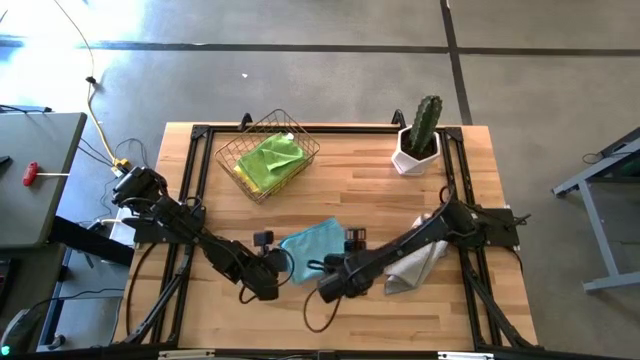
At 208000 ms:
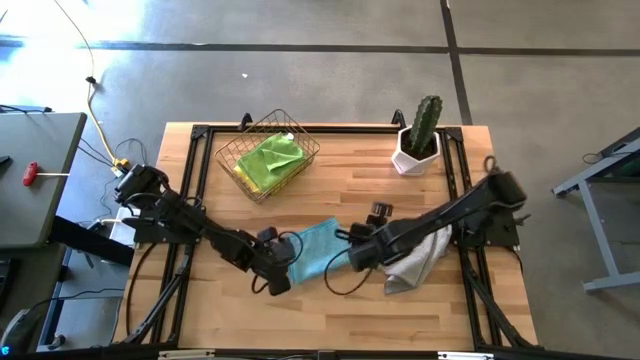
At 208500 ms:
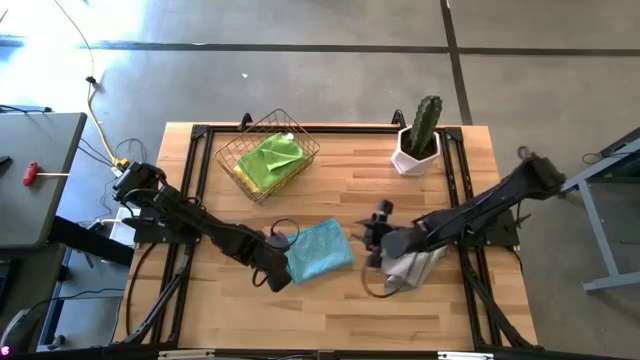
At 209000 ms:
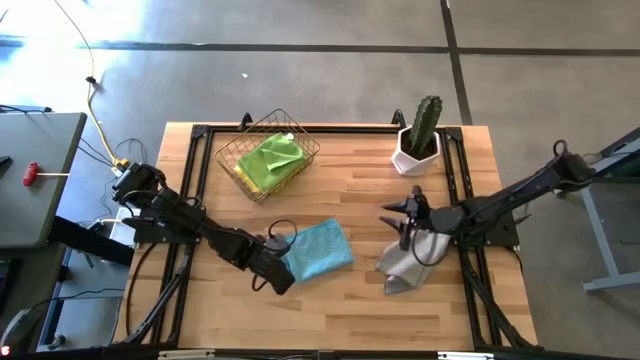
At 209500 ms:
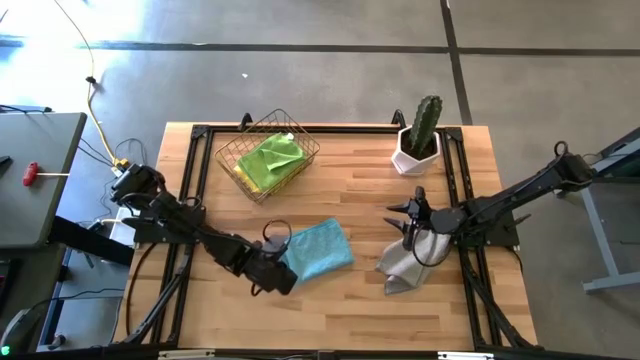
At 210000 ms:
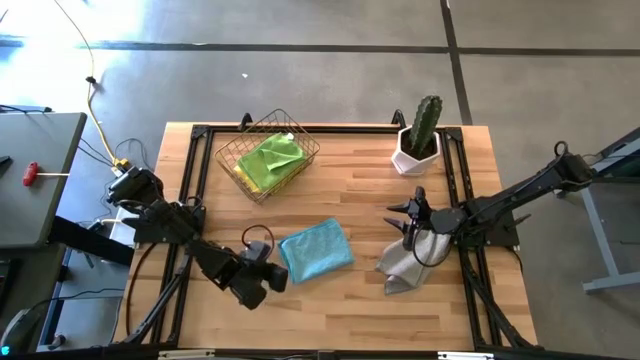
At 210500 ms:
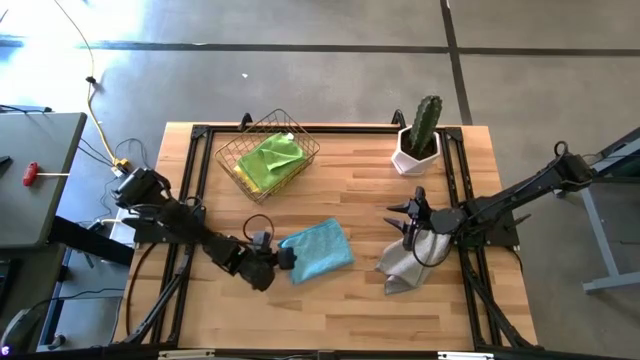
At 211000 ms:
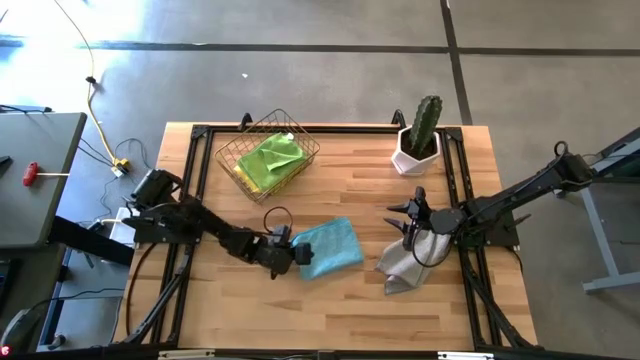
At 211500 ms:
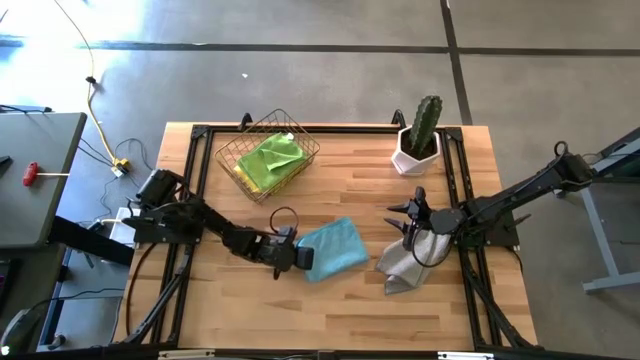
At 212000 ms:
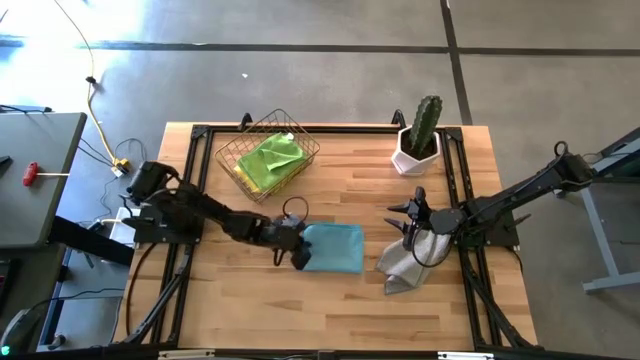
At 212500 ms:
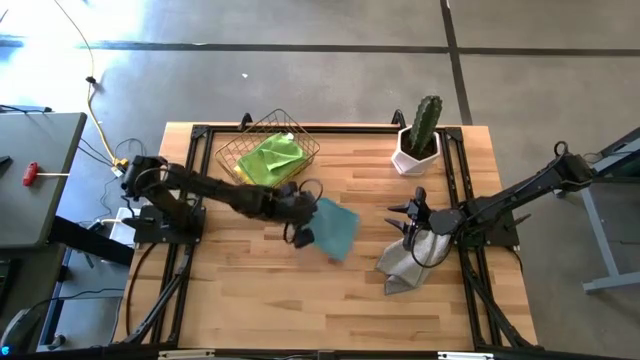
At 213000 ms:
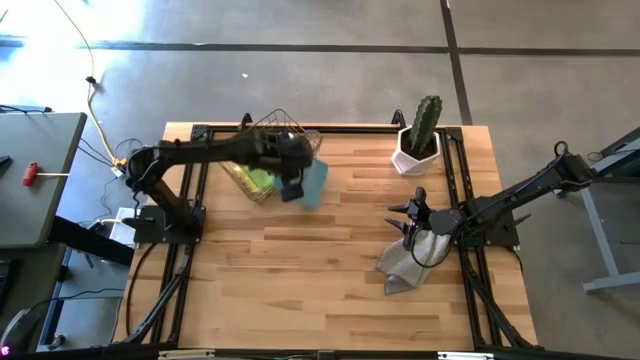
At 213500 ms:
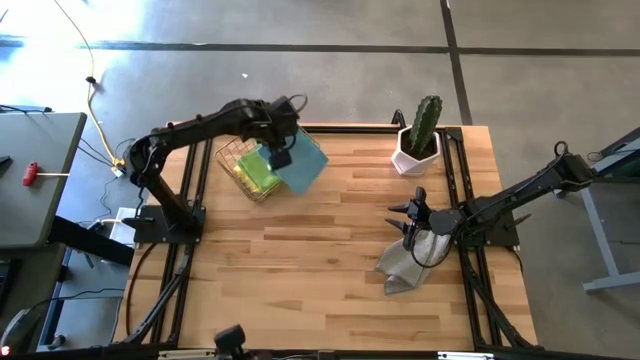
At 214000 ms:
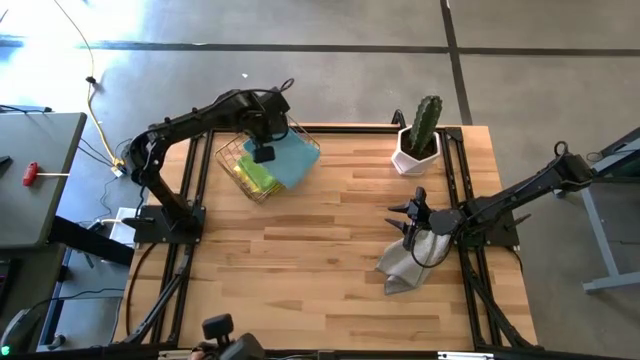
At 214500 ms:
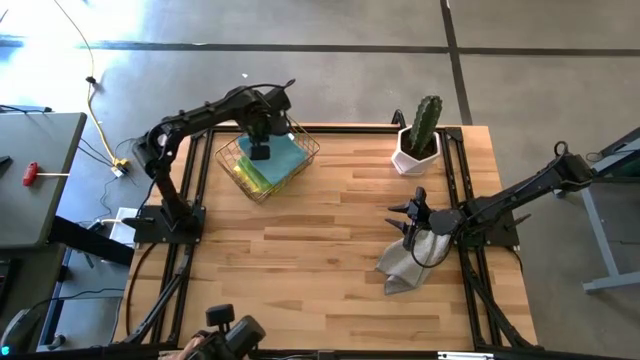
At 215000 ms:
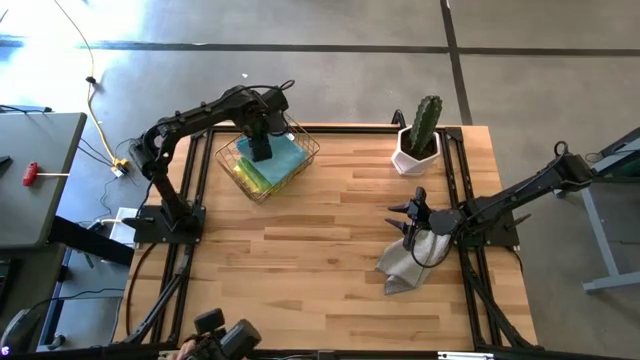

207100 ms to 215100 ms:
Task: Fold microfiber towels
Put the folded light blue microfiber towel into the wire basket

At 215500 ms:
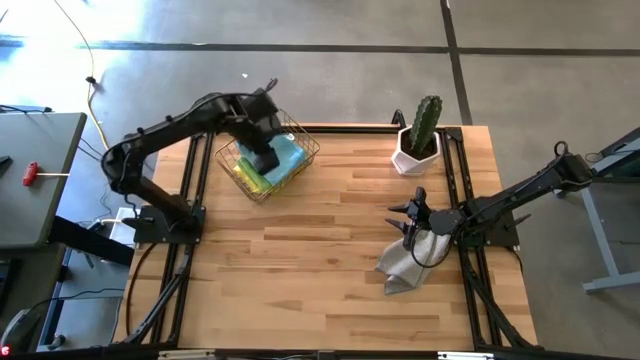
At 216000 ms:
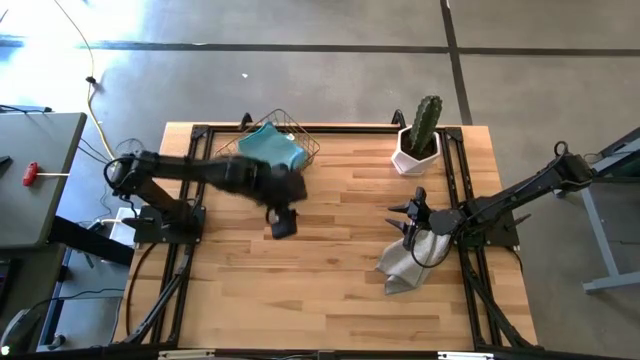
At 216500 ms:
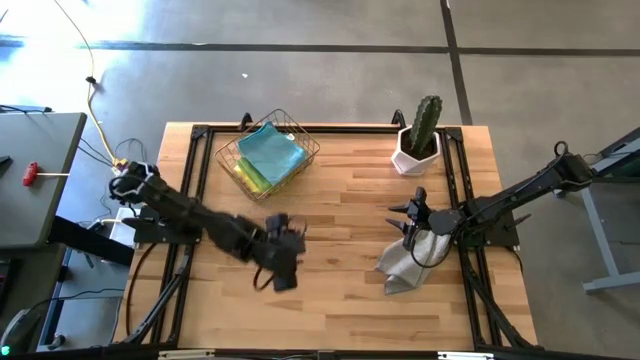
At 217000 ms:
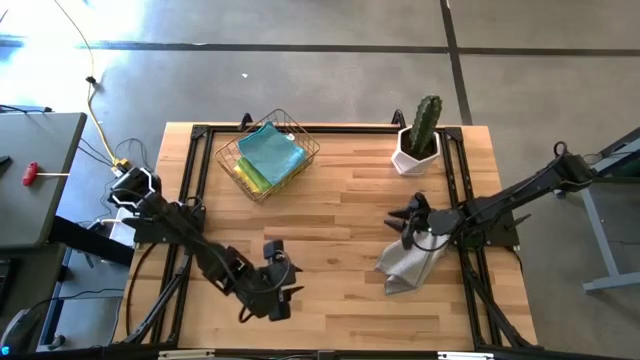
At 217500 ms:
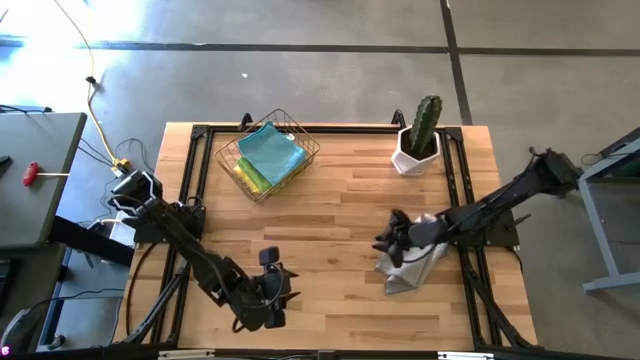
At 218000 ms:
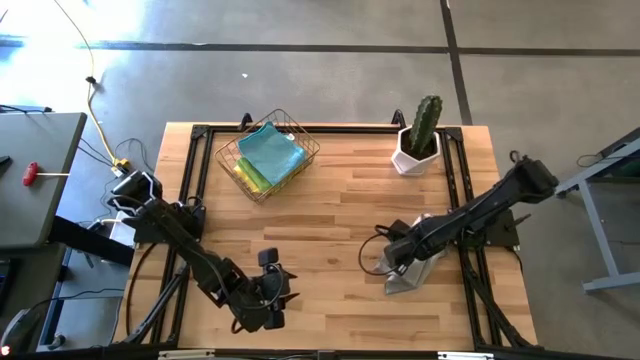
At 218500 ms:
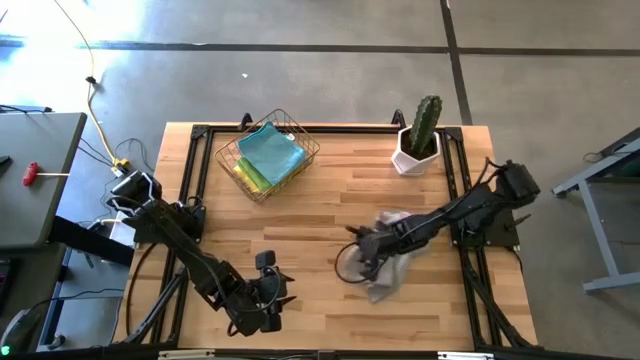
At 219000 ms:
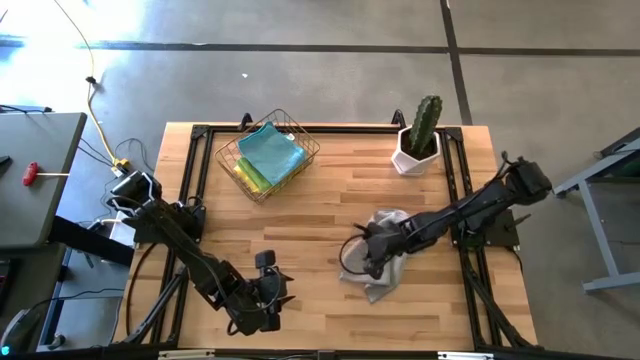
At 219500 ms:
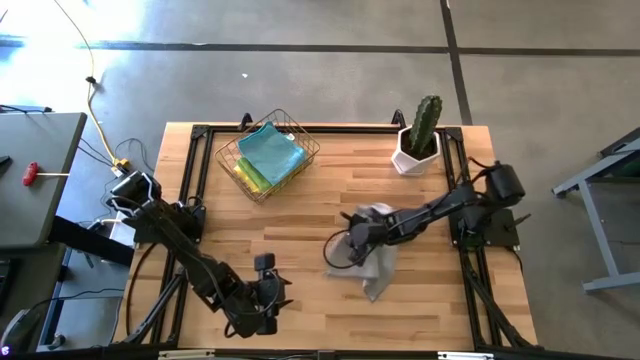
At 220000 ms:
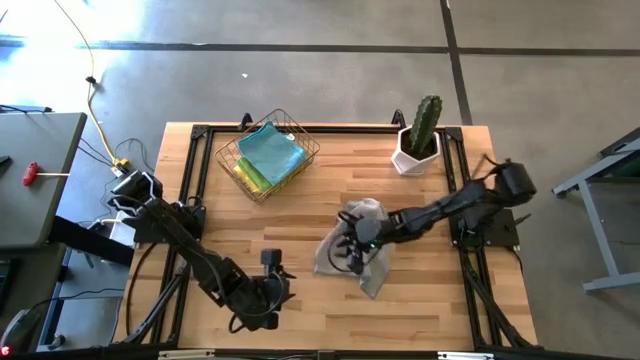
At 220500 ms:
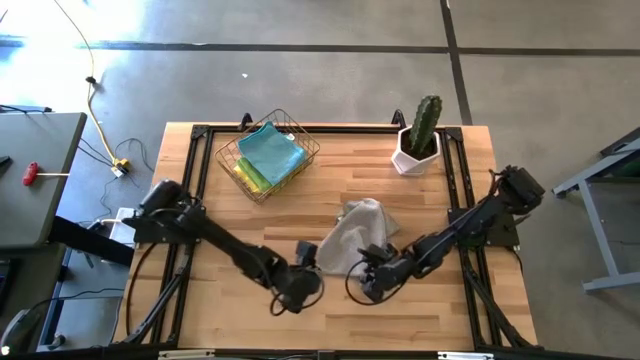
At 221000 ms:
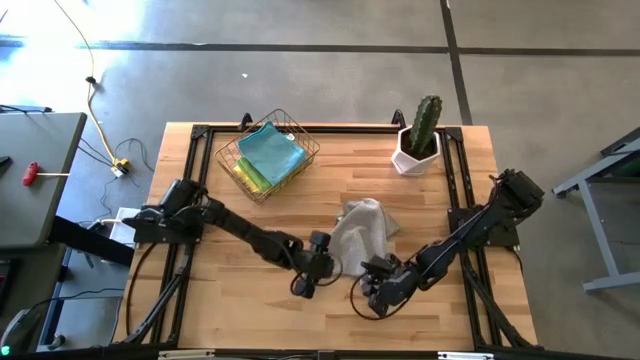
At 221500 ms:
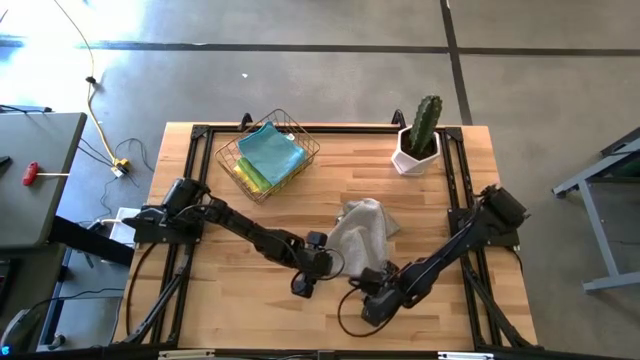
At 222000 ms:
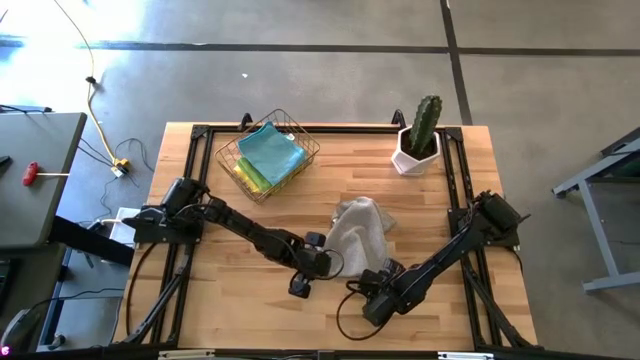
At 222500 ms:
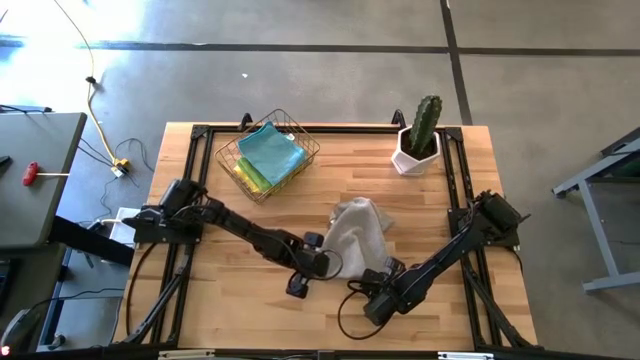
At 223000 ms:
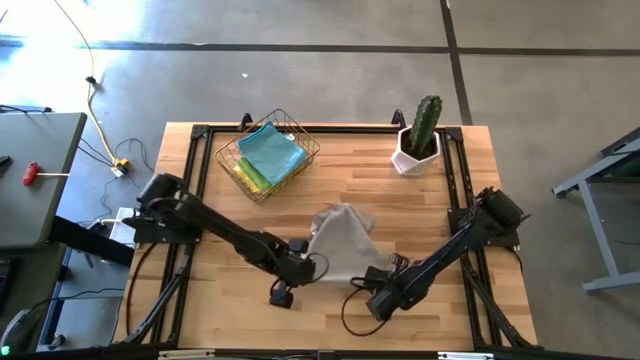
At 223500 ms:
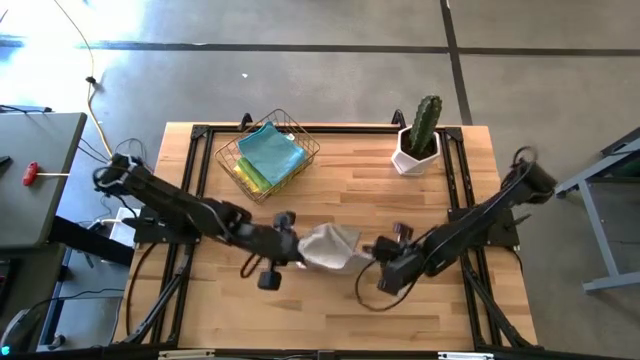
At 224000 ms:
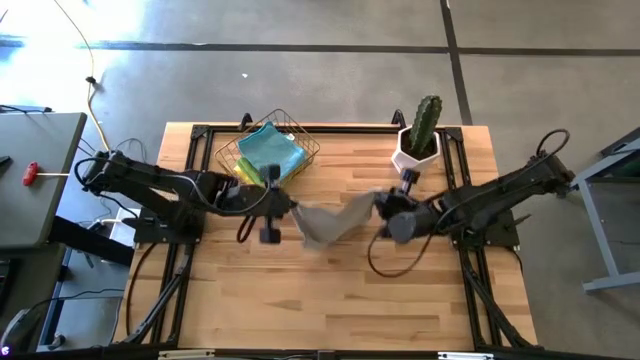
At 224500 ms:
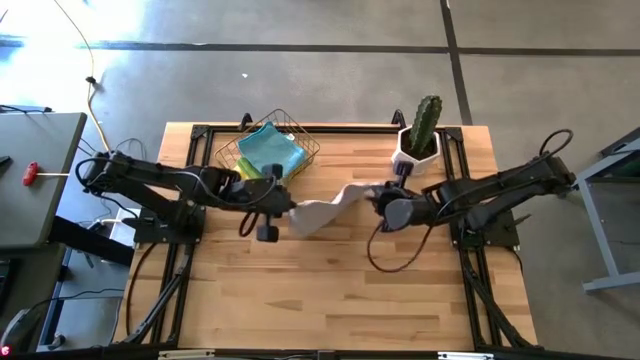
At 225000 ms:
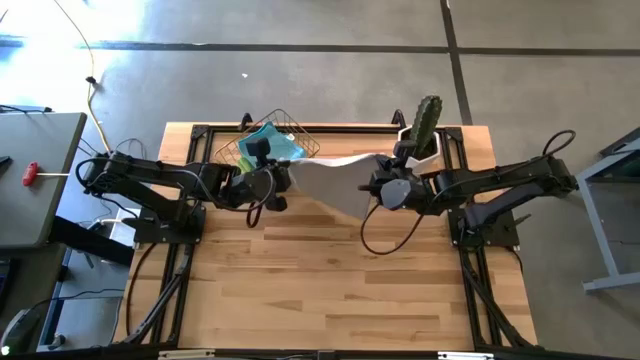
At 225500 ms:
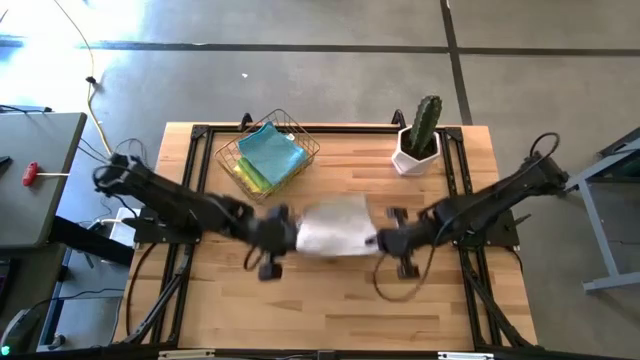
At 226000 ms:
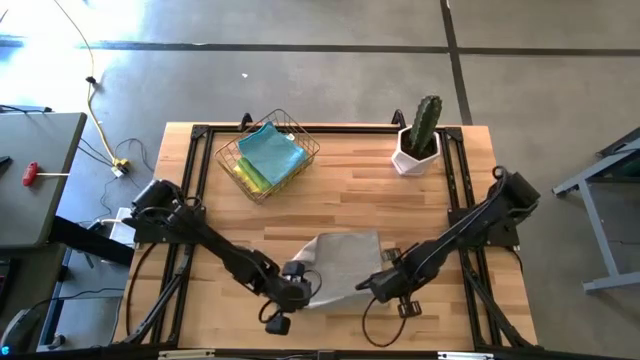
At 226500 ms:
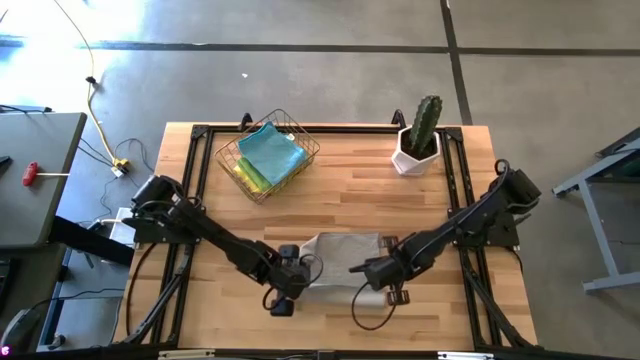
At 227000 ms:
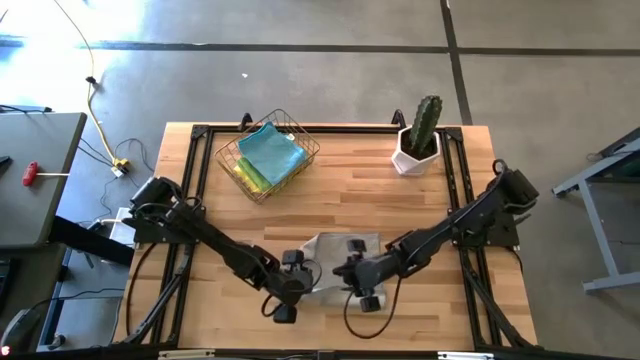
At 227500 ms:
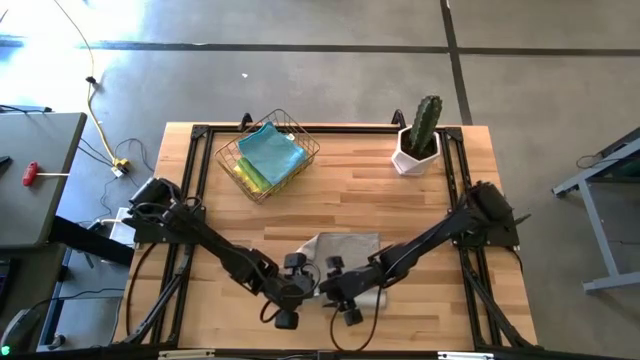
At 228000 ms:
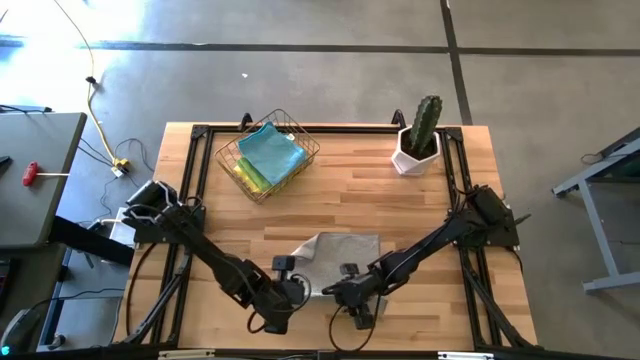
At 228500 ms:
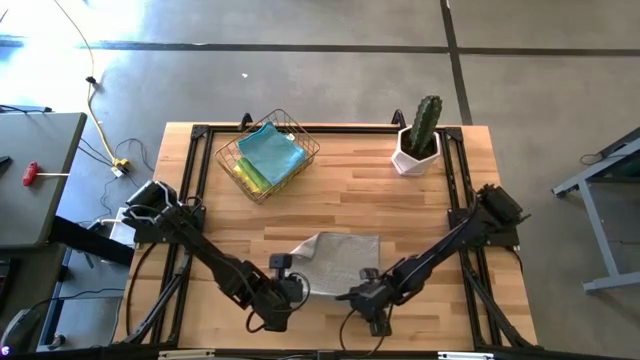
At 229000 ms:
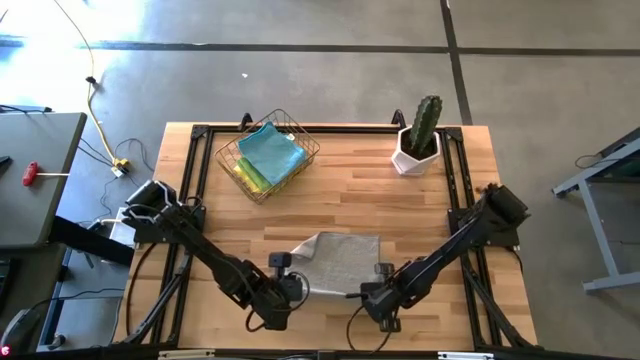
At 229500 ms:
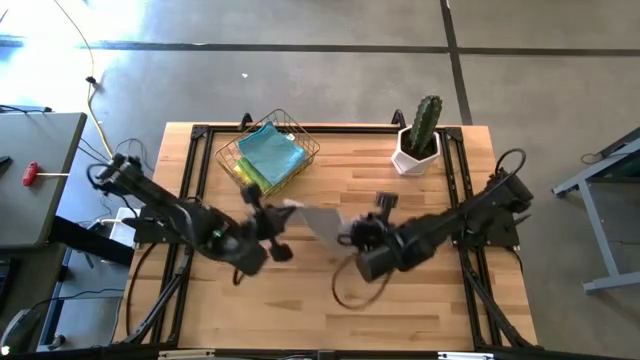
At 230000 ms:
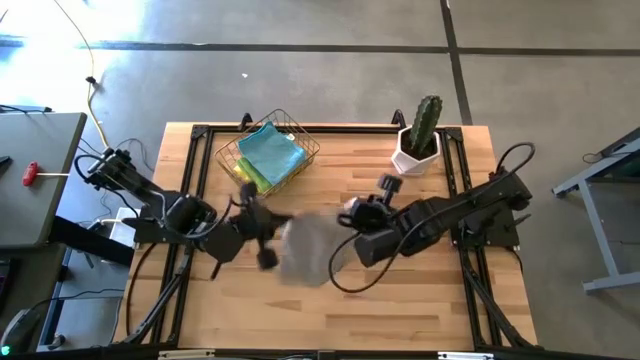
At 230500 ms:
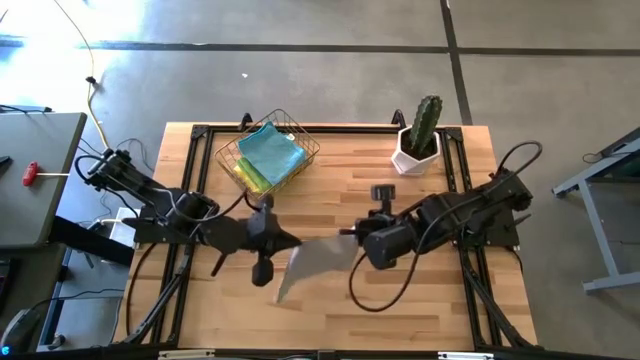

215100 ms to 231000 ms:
Fold the gray microfiber towel
